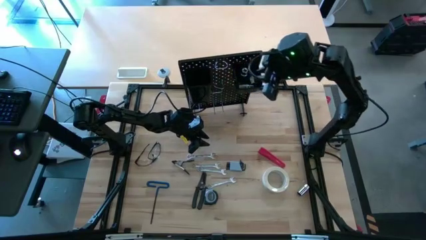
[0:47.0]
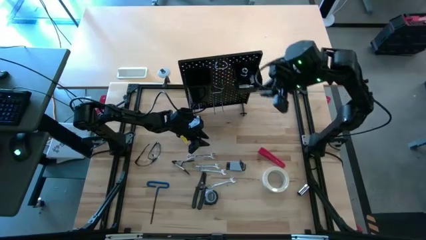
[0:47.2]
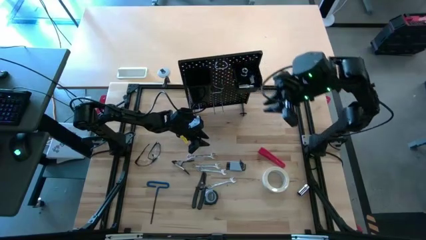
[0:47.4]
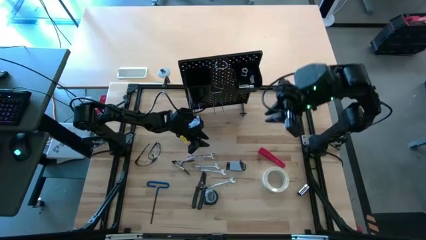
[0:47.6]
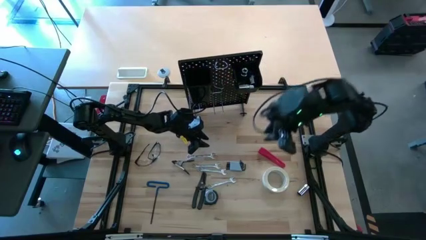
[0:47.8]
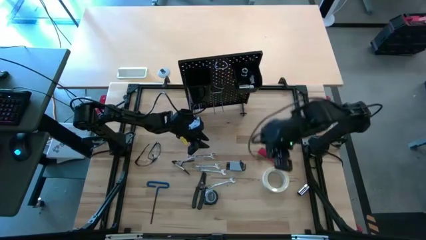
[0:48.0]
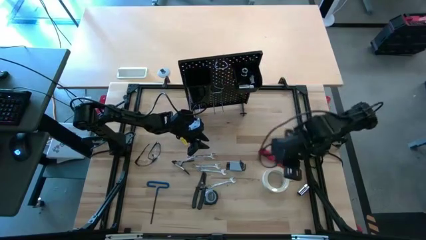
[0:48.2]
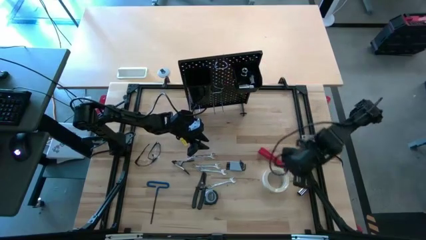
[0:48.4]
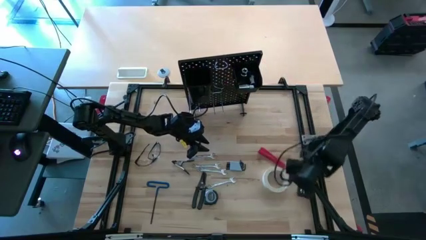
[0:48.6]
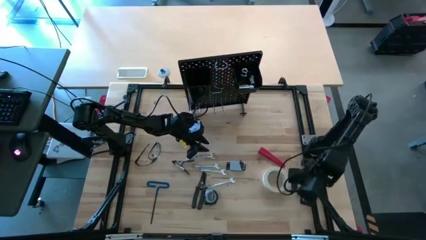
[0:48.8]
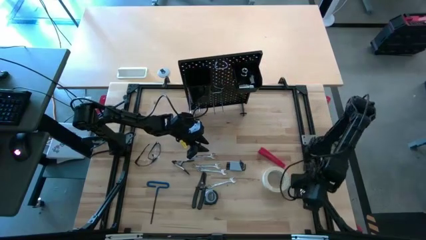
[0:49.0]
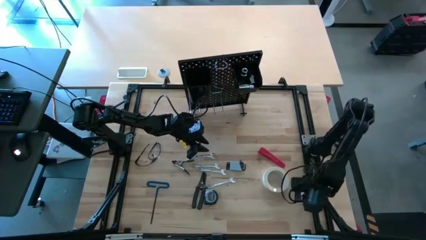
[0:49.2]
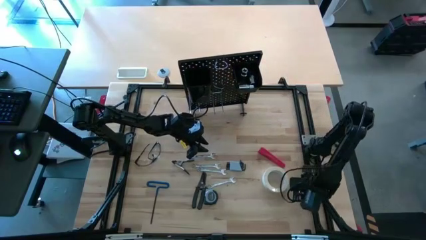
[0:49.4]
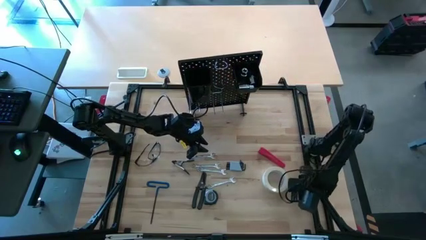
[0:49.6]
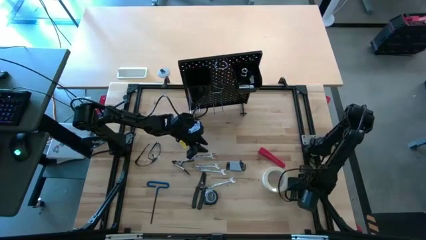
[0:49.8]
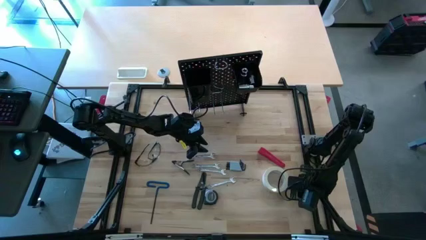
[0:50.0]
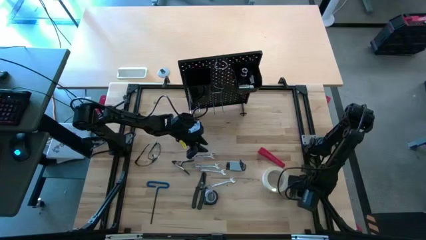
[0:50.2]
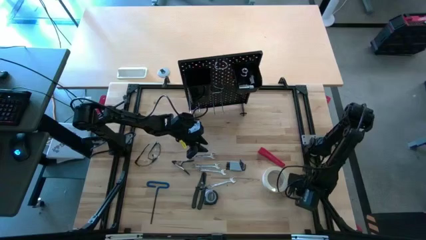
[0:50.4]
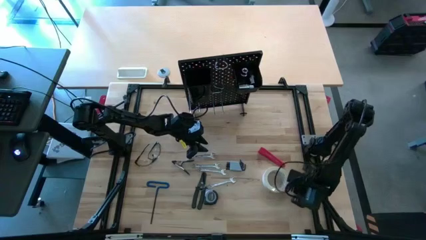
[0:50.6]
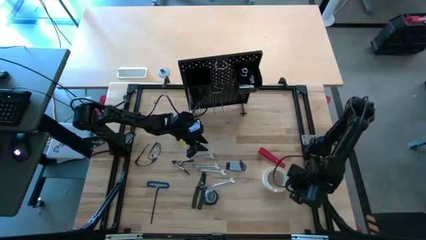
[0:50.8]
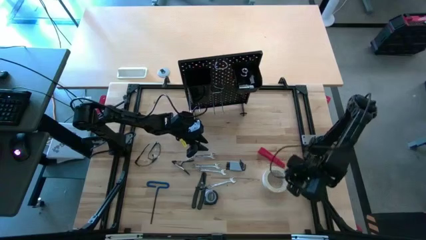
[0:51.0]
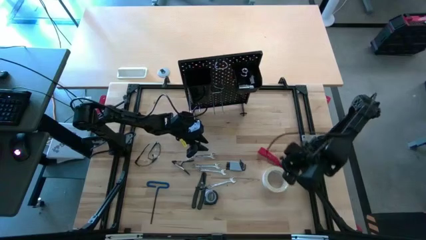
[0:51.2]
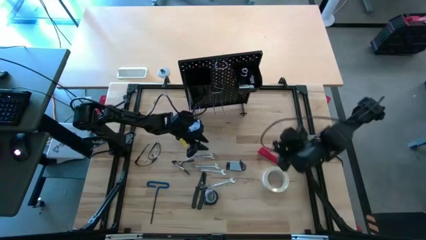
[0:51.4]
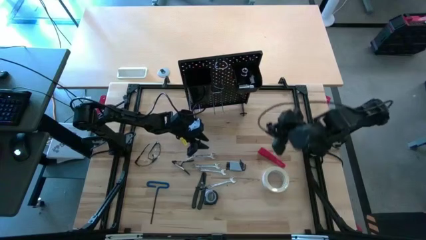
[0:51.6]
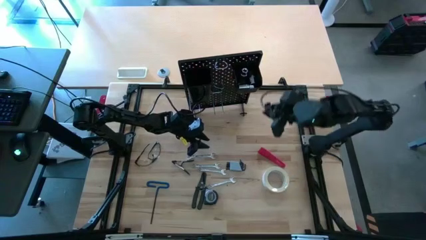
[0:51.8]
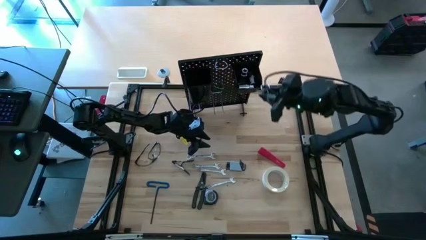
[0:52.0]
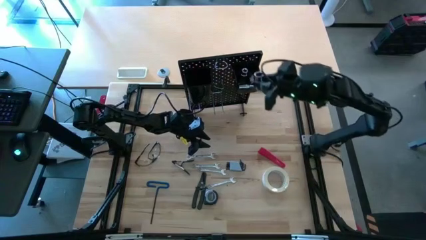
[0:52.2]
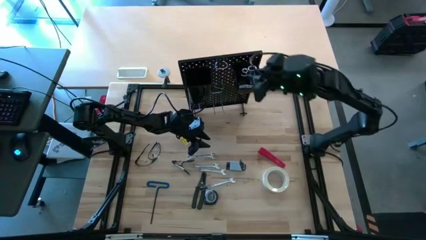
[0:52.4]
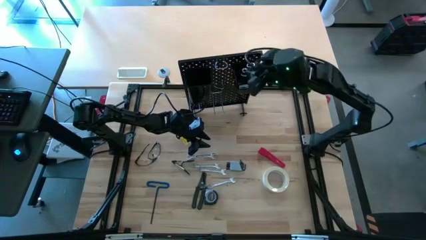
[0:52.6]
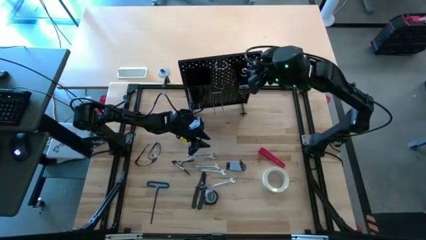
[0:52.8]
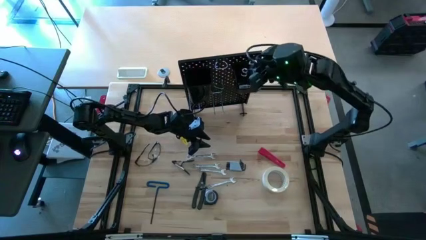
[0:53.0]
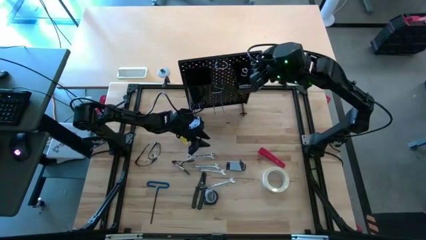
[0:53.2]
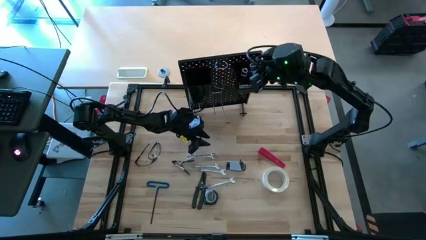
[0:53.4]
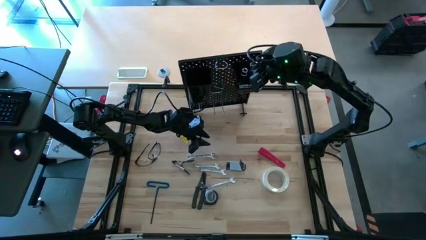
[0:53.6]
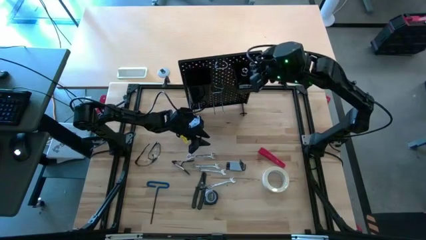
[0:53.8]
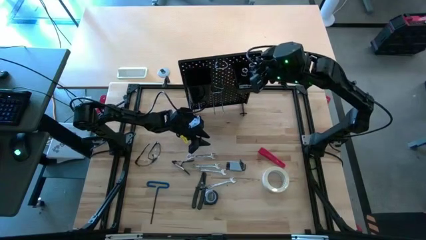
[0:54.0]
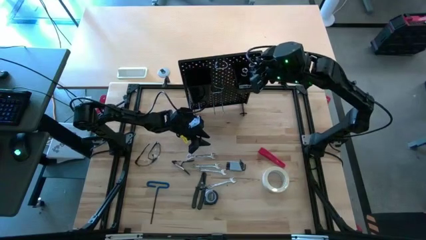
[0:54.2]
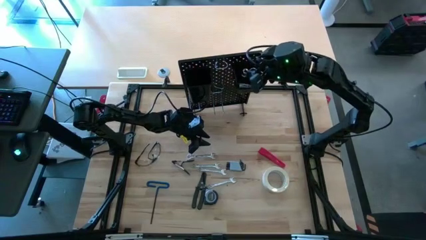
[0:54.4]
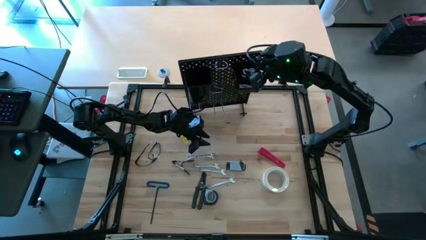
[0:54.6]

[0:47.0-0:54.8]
Task: Hang tools onto peg board
Put the silver socket into the black bin on the pegboard

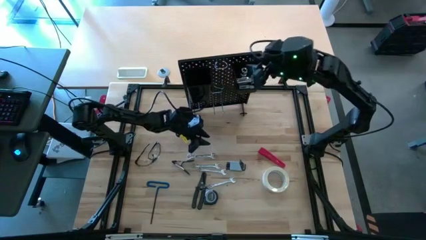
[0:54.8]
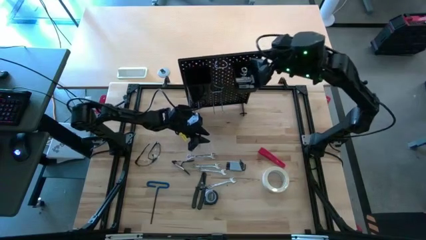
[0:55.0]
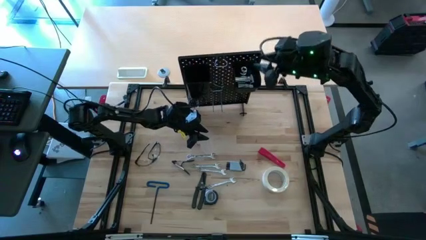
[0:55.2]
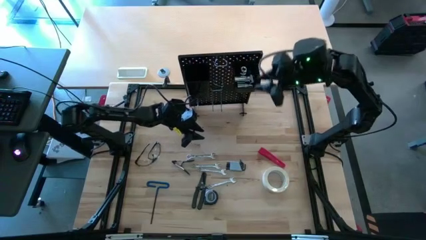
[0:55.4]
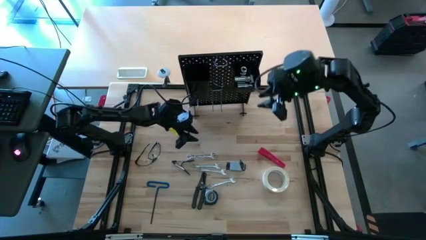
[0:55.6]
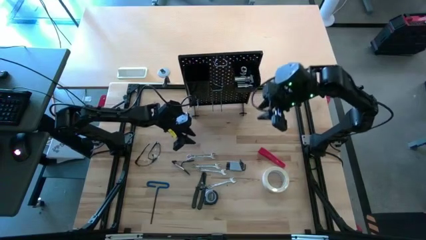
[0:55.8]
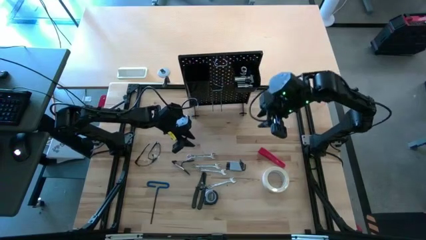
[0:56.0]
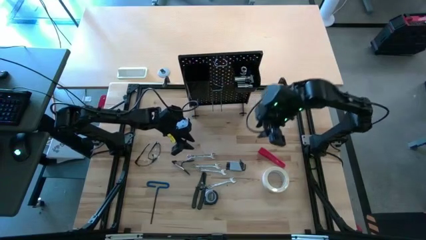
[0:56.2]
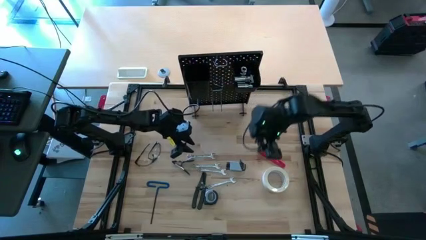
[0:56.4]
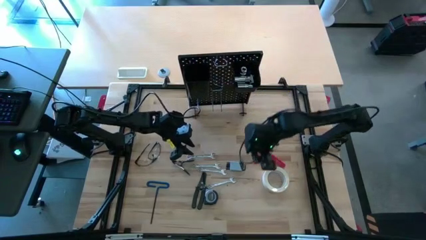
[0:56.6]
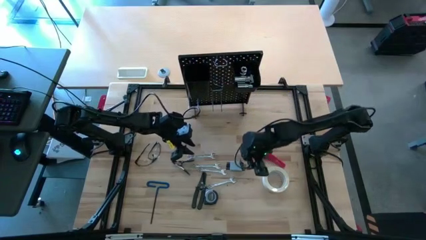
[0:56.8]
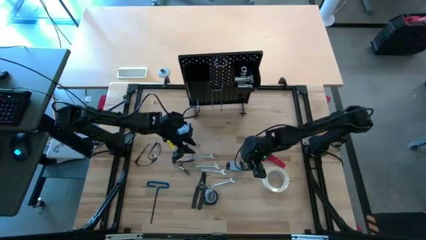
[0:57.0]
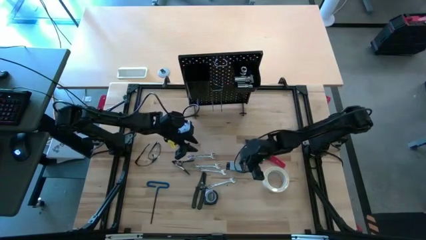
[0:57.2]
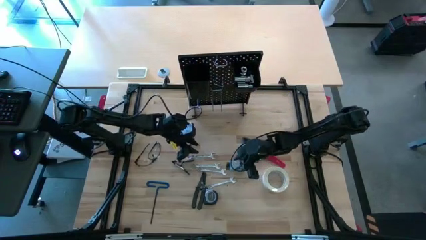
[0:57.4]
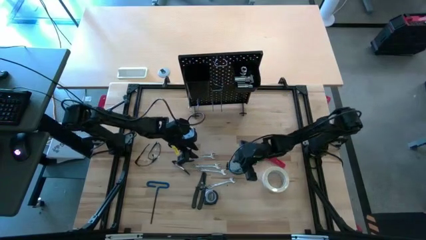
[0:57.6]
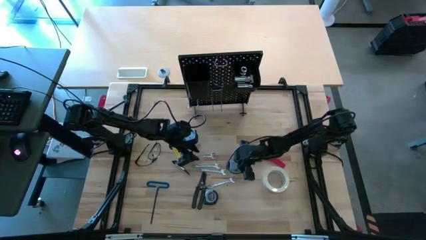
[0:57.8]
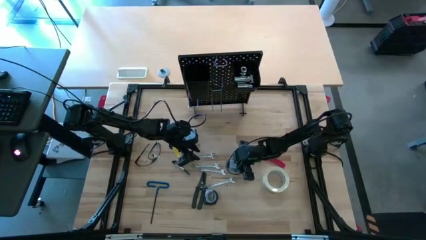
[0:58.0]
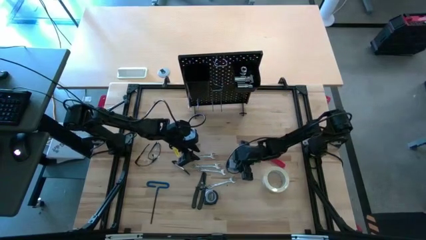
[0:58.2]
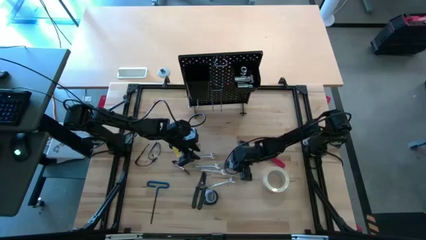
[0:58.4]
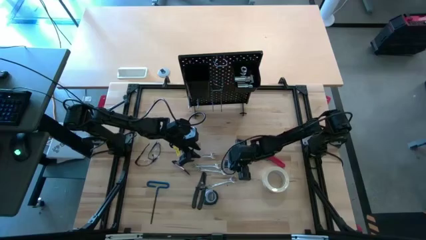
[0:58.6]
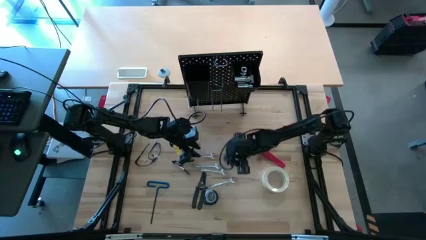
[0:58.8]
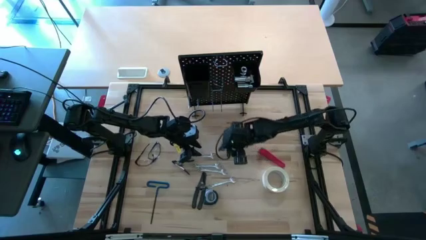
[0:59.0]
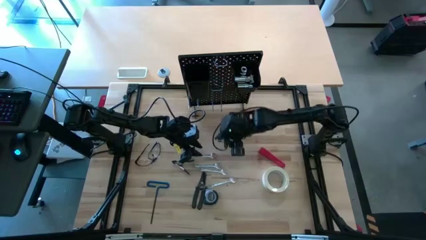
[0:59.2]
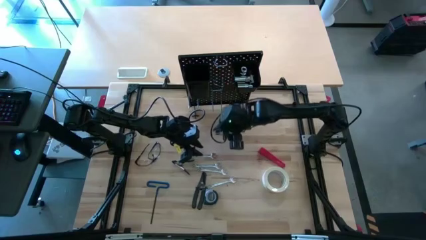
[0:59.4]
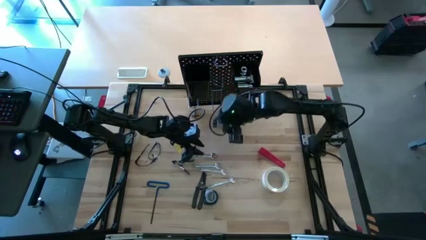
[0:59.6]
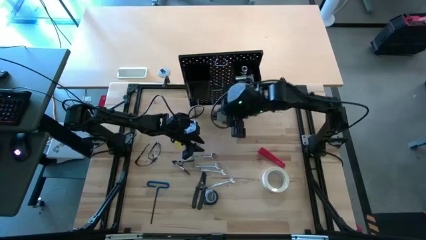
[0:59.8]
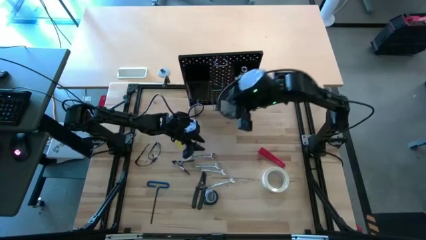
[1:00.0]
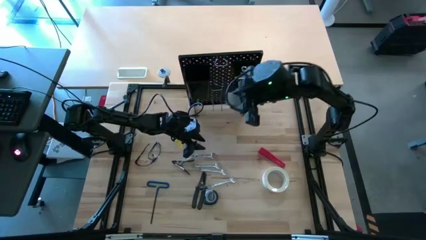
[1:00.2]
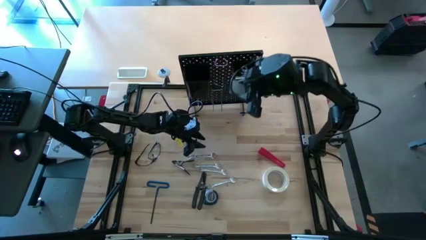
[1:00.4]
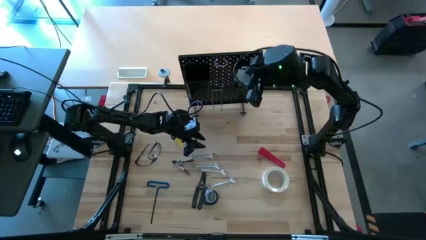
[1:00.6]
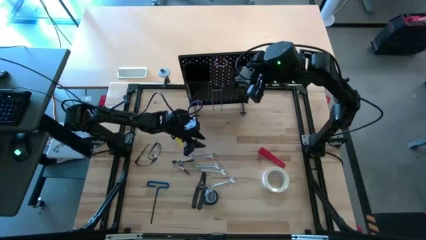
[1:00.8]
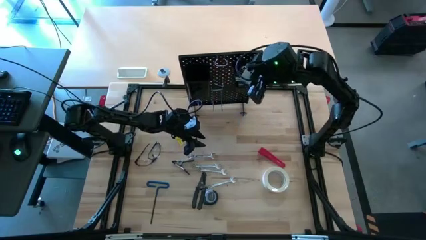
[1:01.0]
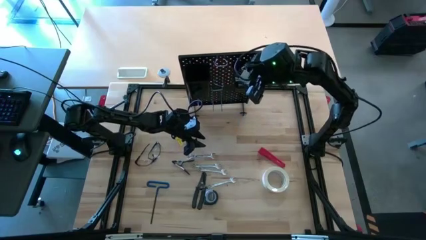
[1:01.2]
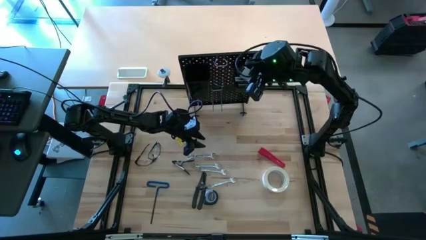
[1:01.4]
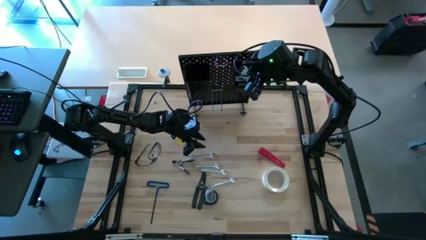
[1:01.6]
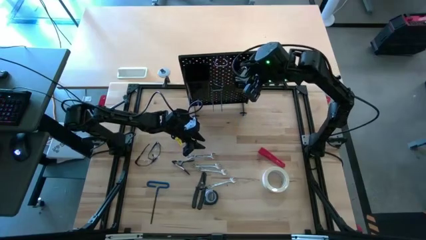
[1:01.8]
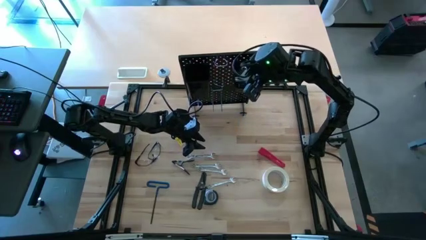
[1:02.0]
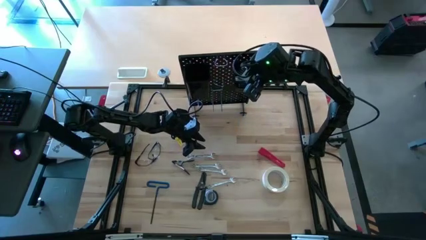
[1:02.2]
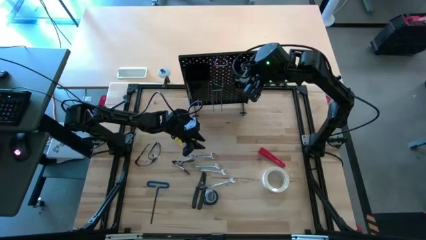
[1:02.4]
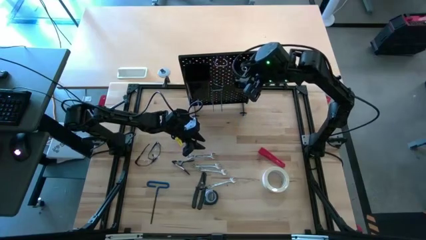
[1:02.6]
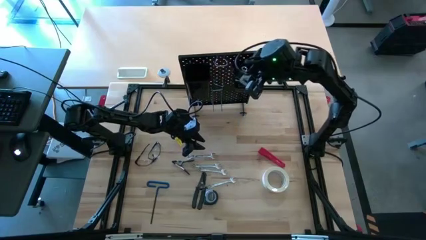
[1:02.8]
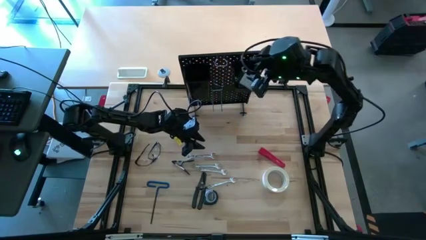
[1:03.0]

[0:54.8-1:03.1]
Put the gray hex key set into the black bin on the pegboard
